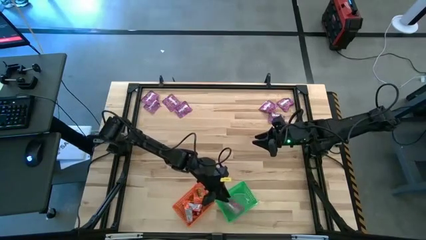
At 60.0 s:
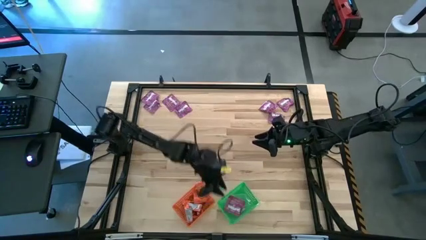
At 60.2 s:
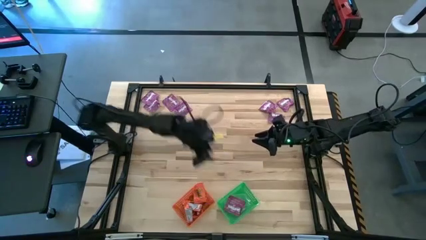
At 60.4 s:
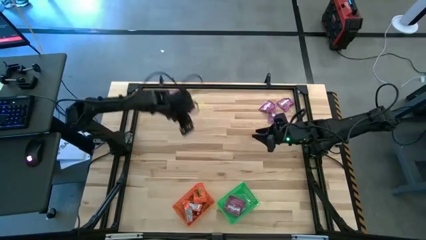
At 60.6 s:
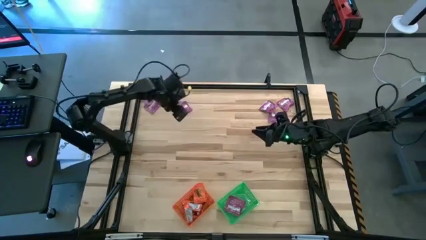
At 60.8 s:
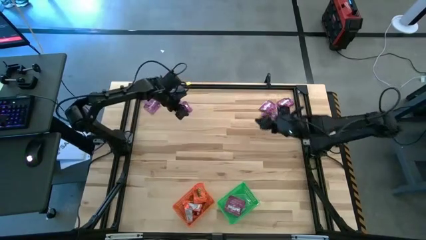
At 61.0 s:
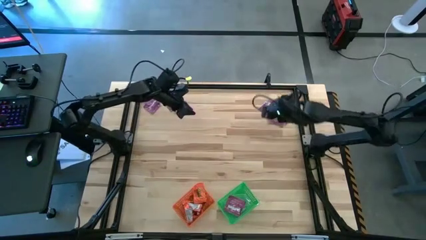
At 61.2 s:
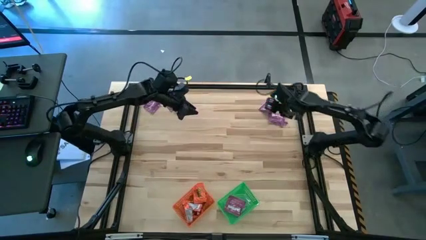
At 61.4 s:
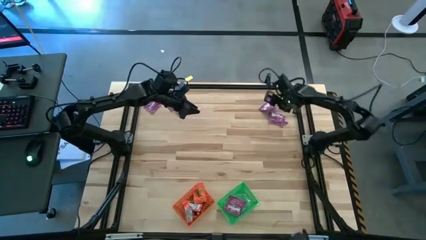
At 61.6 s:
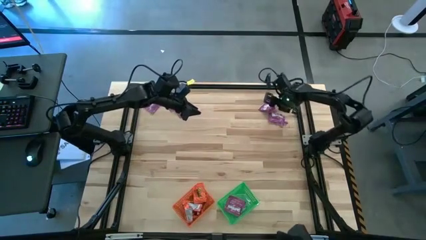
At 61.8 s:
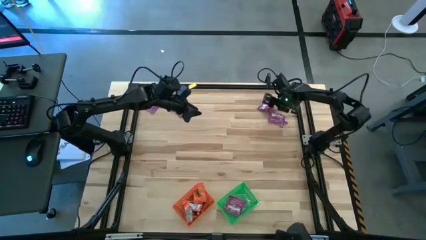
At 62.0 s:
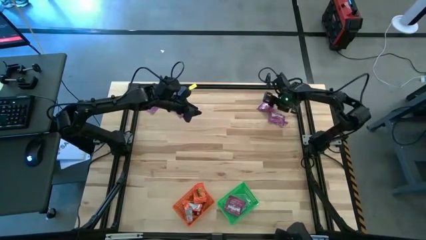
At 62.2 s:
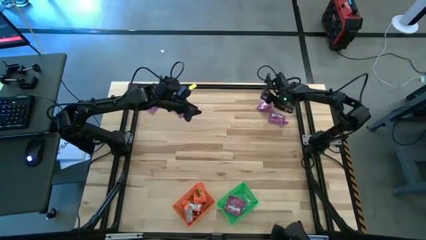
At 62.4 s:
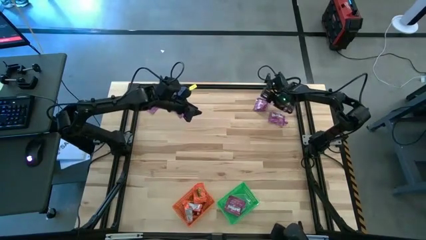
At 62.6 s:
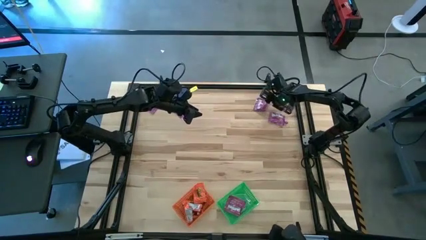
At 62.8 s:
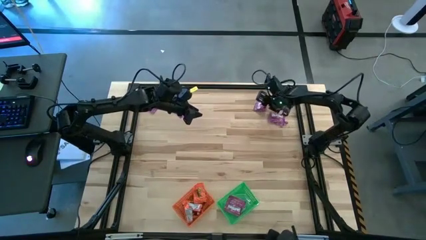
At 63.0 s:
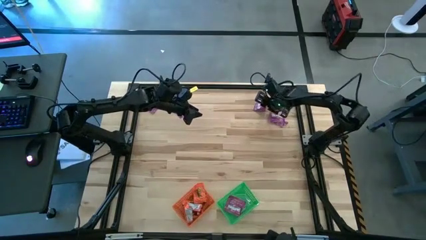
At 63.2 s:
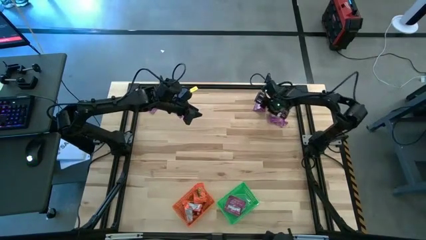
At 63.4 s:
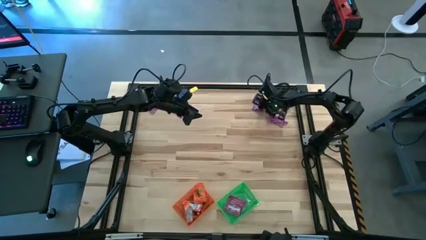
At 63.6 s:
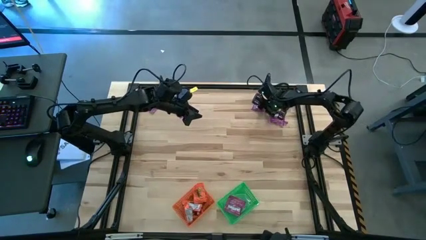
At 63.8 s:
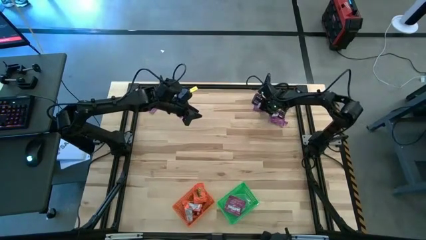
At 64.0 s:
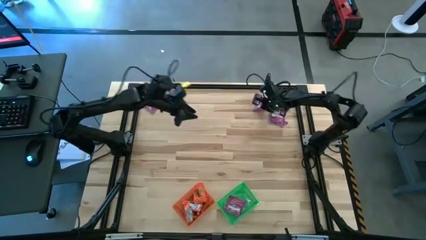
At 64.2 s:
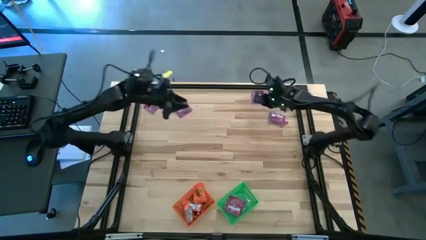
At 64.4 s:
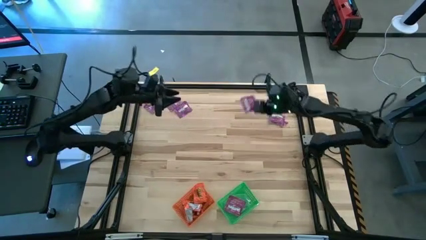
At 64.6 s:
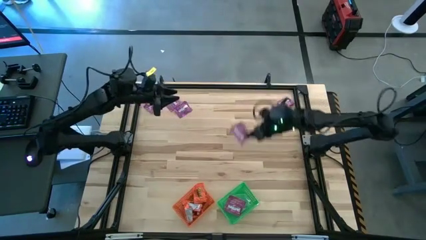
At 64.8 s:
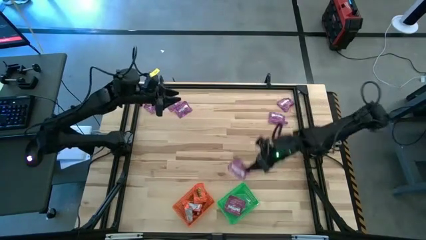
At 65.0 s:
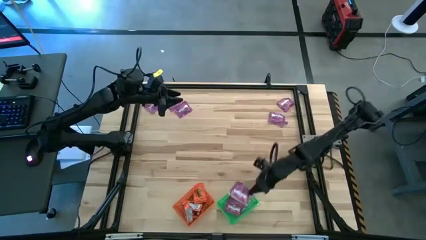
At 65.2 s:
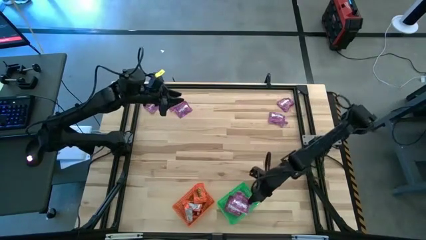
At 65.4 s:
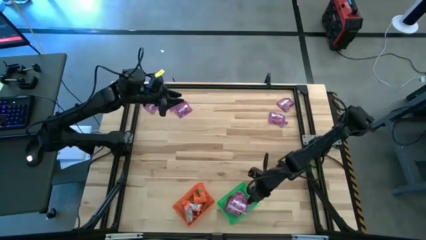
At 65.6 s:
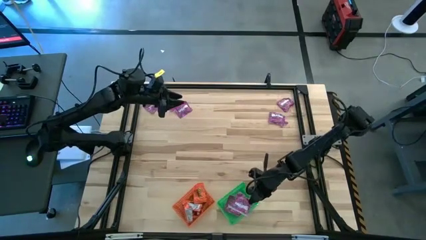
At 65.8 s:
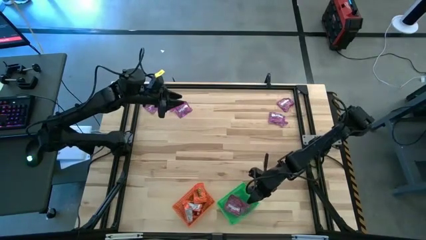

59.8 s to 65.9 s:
Task: Sort candy by brand, put in halloween buckets
Put the purple candy into the green basket

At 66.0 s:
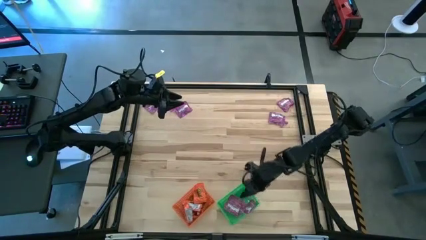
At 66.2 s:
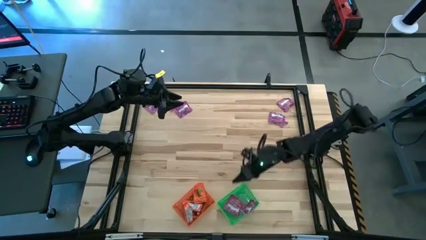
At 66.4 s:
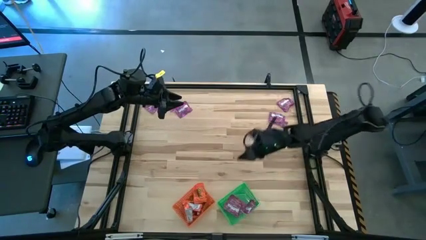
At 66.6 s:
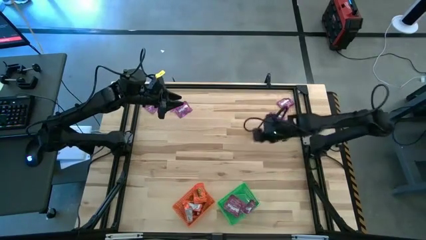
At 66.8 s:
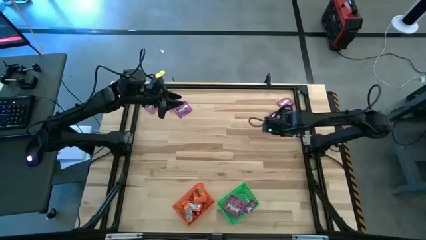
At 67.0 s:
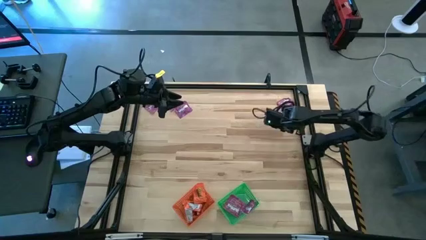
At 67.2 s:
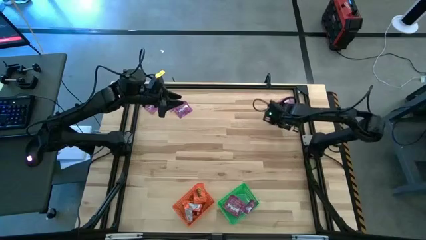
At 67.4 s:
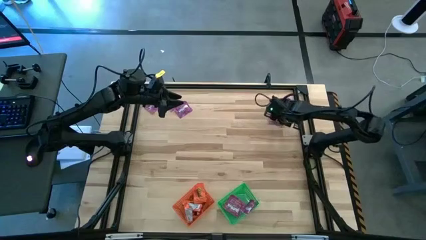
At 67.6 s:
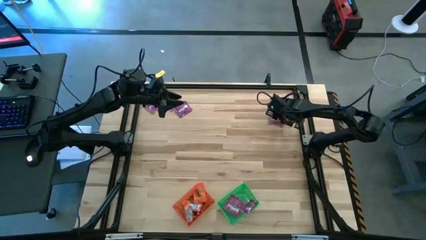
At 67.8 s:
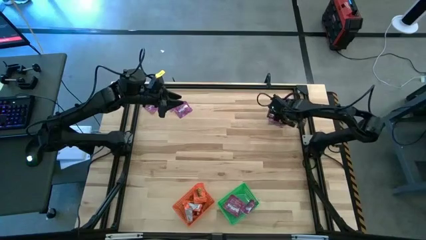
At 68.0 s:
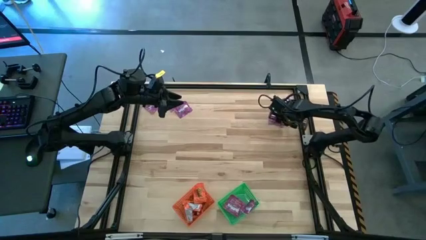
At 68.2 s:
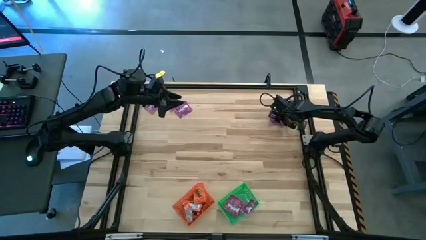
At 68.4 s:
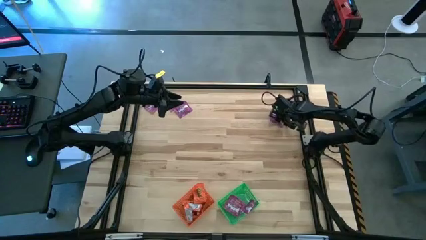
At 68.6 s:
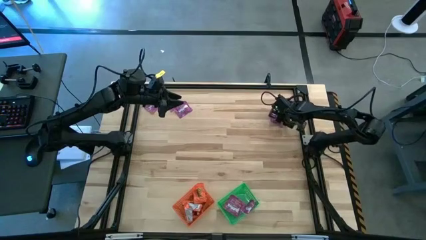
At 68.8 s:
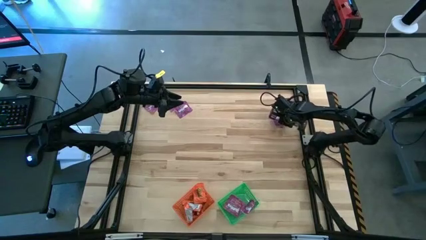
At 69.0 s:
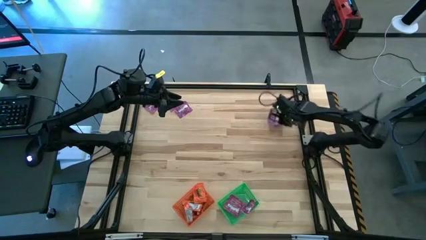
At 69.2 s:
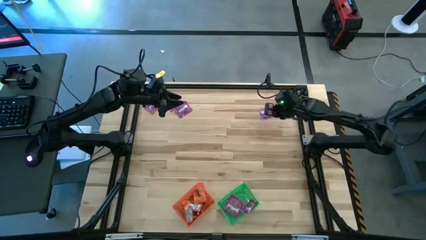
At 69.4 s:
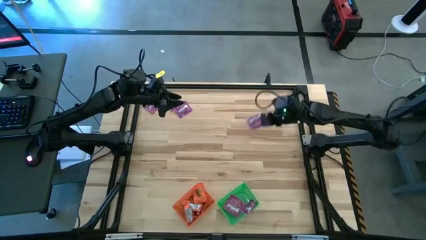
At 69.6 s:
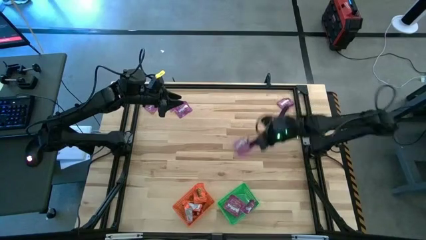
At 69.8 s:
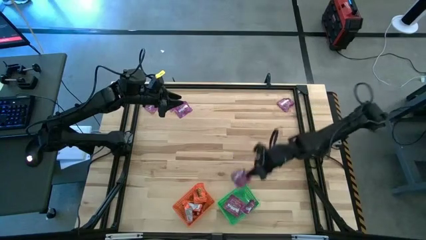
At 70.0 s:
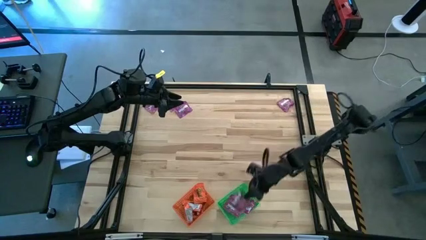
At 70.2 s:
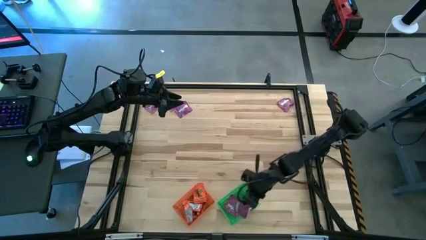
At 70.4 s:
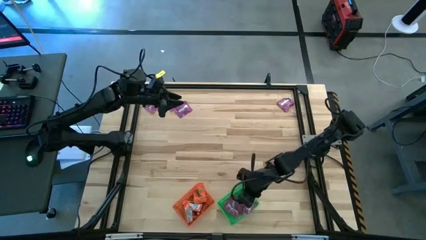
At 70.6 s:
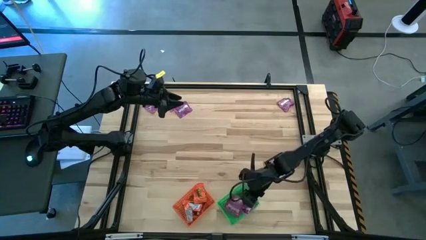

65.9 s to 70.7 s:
Put the purple candy into the green basket

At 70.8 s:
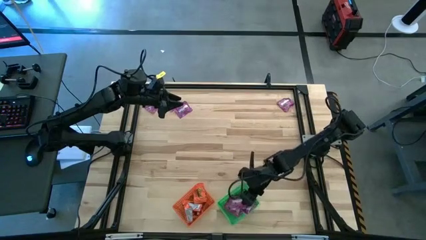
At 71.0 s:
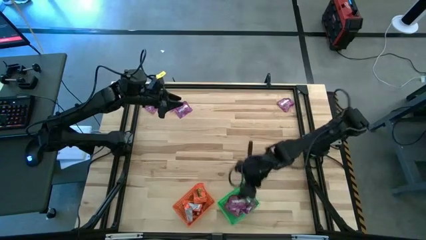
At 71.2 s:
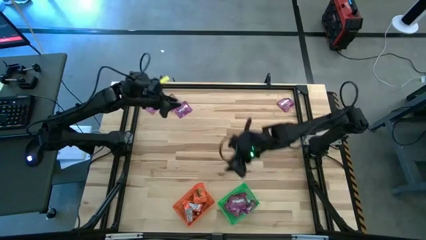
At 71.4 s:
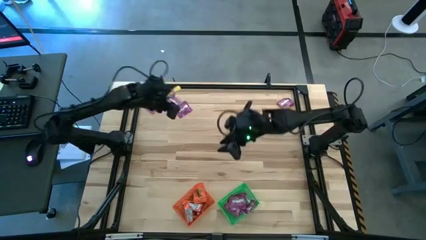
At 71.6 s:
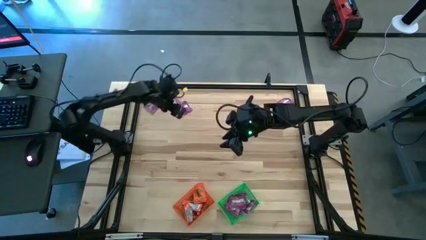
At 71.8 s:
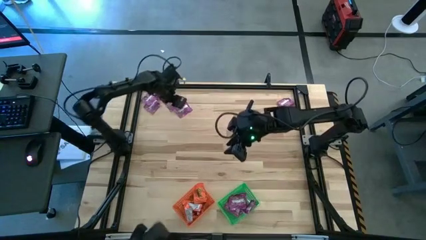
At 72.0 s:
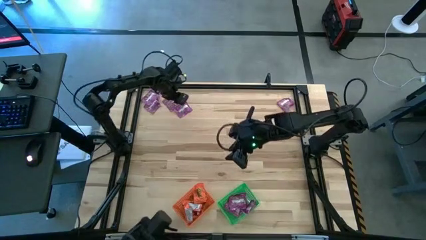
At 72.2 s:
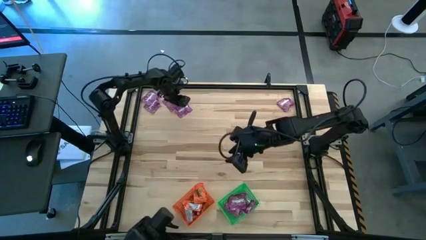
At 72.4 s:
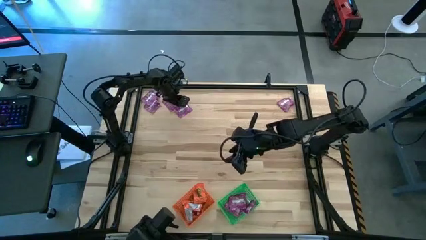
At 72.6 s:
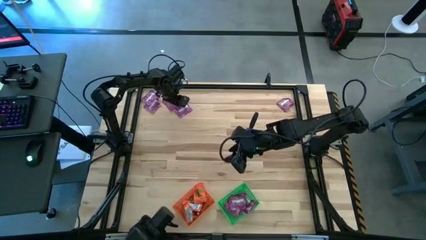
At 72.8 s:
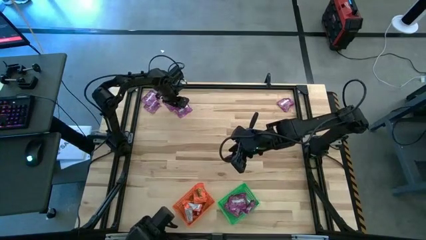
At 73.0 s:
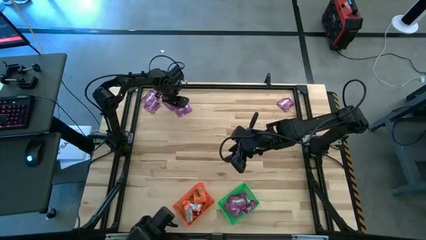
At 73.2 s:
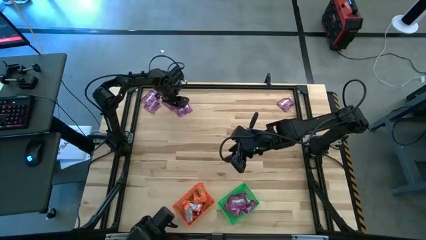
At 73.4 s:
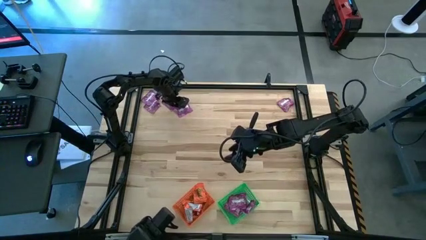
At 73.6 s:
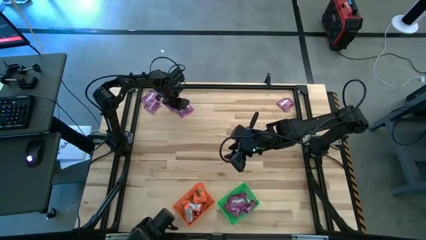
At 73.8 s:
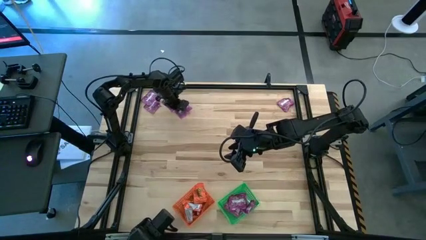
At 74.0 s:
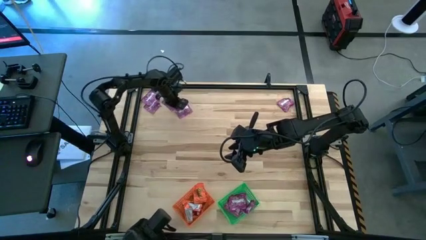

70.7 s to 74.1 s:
Put the purple candy into the green basket

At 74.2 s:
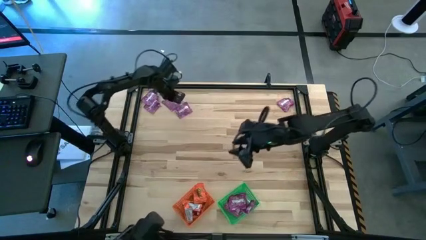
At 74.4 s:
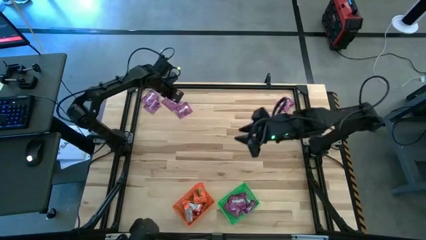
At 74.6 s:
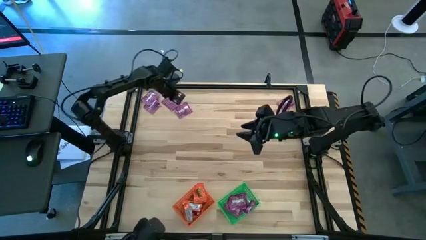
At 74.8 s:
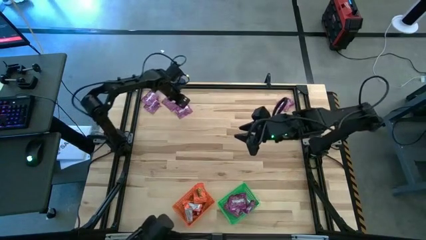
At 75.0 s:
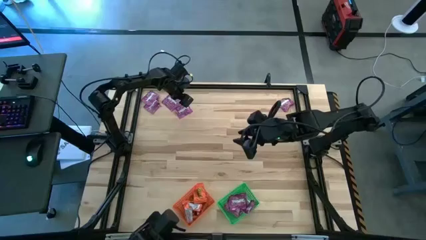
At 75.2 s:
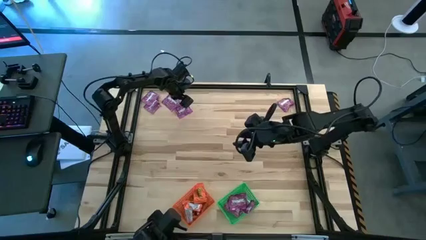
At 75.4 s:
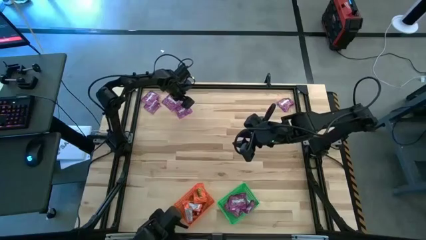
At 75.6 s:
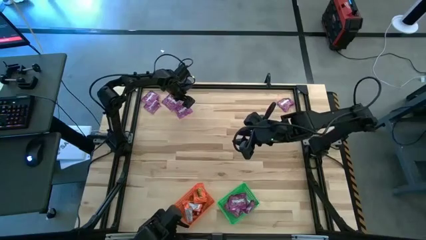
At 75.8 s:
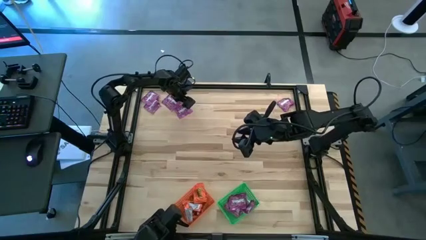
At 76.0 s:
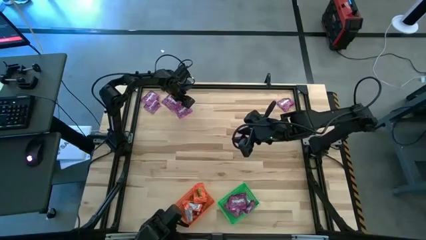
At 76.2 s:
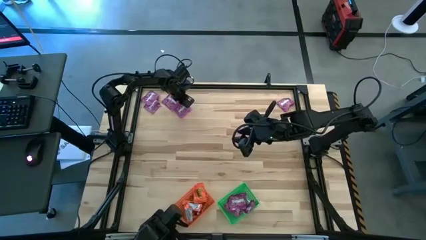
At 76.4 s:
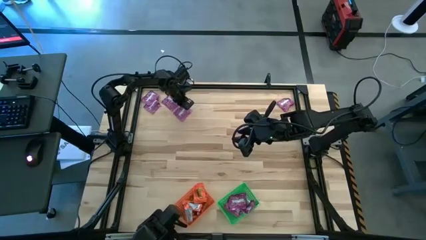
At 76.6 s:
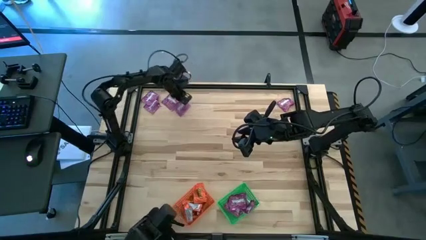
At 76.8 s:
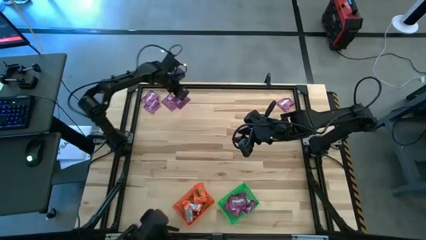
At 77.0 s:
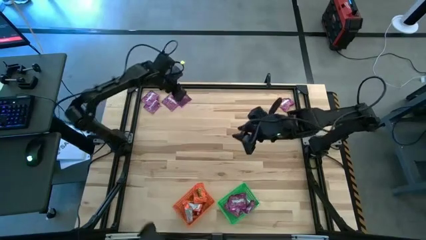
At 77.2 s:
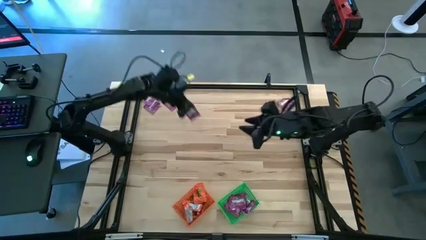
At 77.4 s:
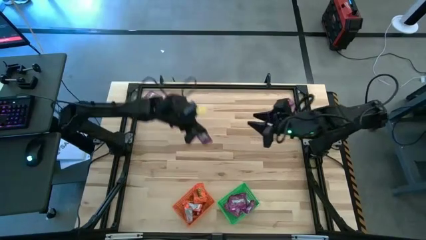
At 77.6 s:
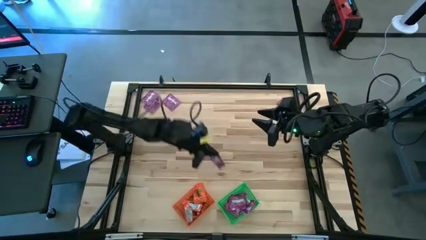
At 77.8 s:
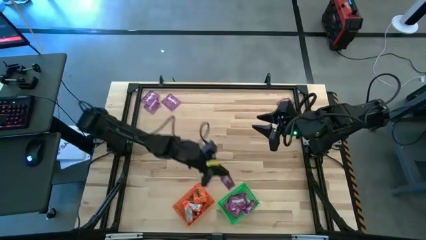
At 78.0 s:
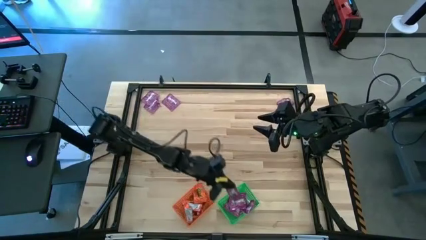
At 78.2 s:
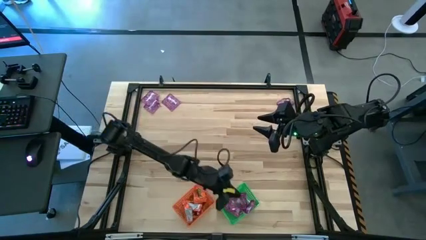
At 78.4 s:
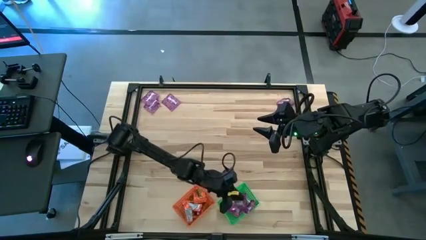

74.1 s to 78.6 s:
Put the purple candy into the green basket
